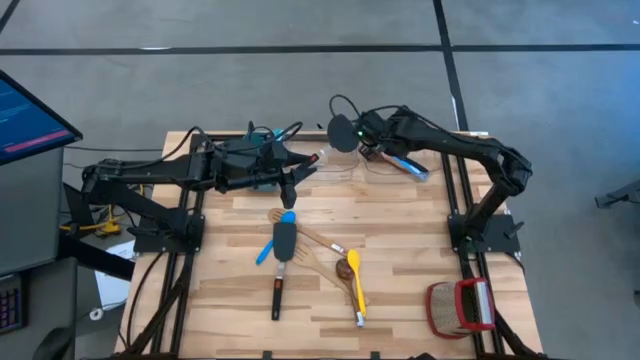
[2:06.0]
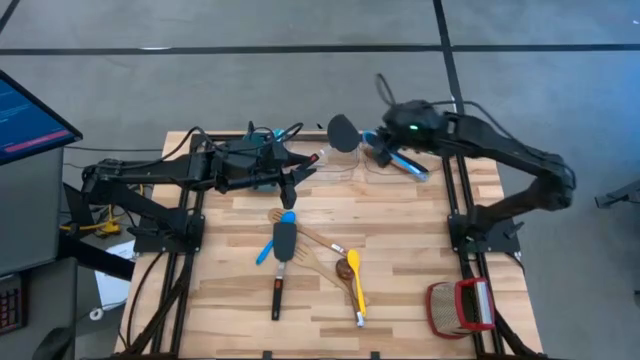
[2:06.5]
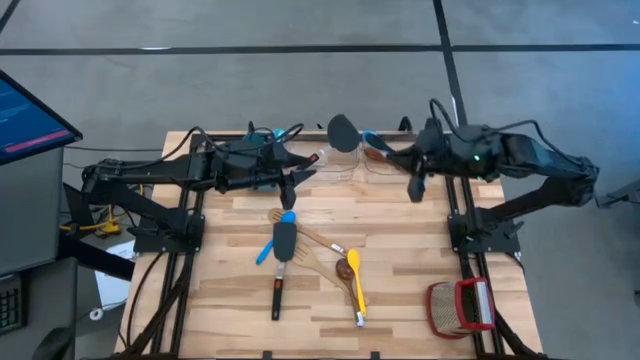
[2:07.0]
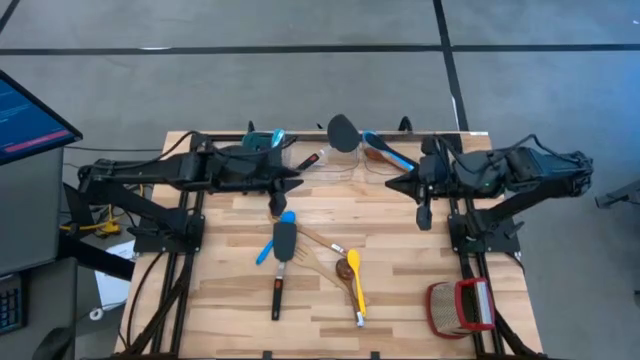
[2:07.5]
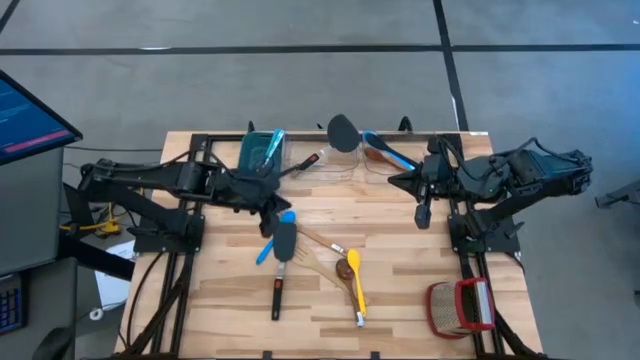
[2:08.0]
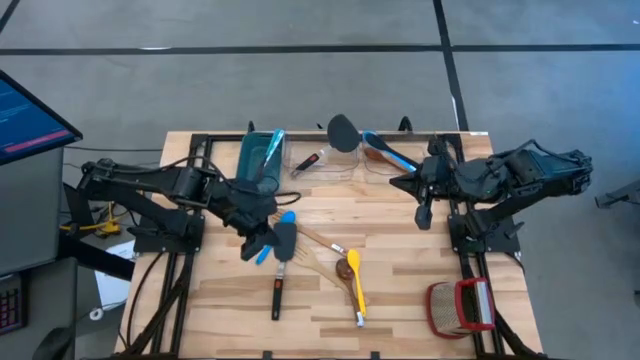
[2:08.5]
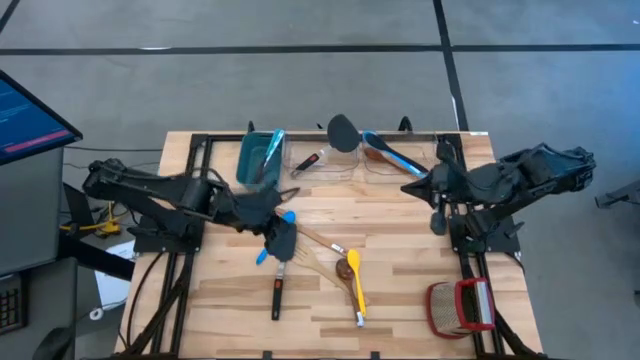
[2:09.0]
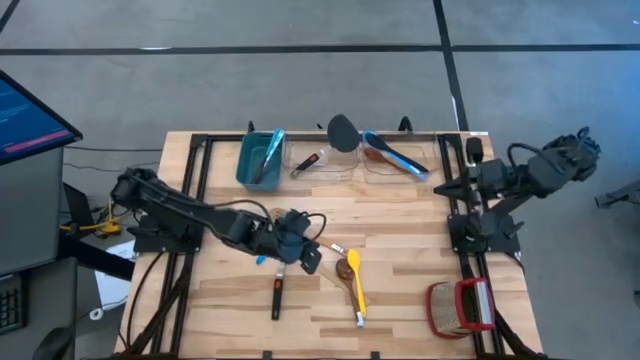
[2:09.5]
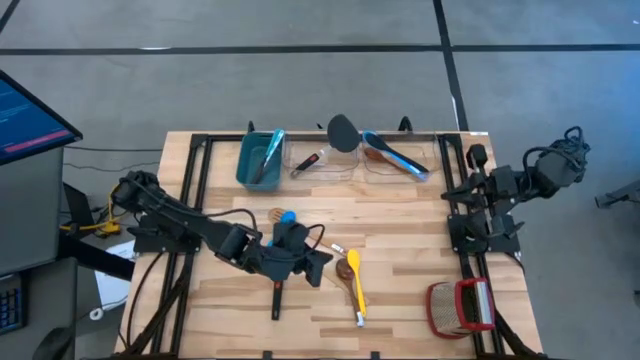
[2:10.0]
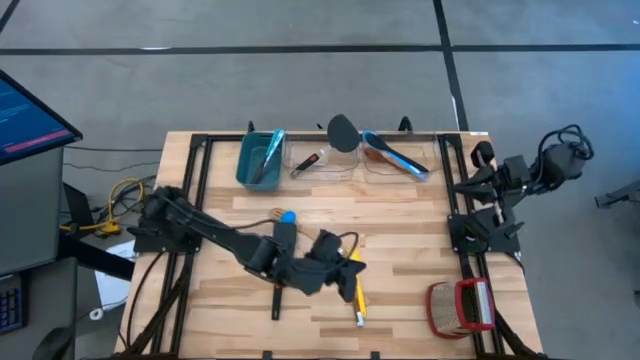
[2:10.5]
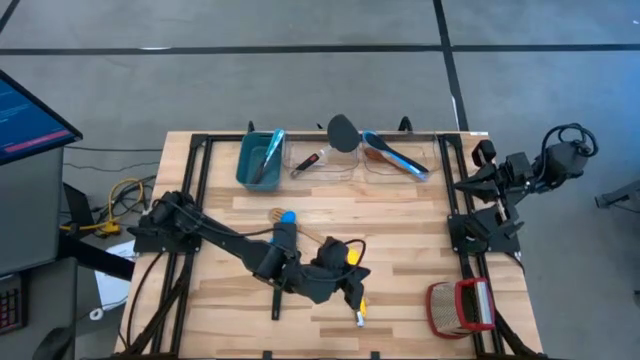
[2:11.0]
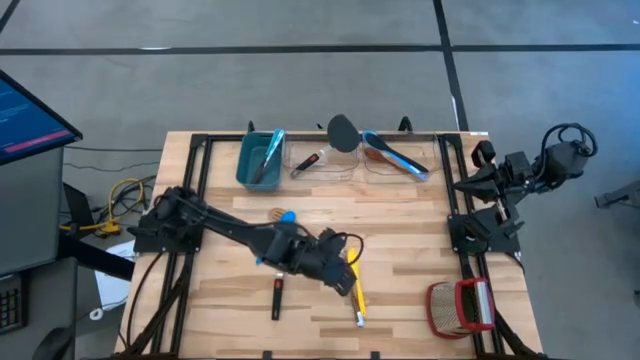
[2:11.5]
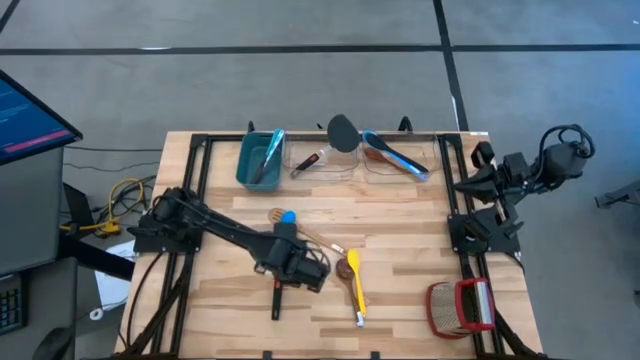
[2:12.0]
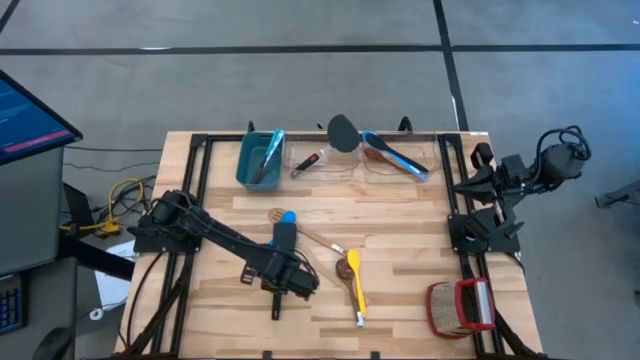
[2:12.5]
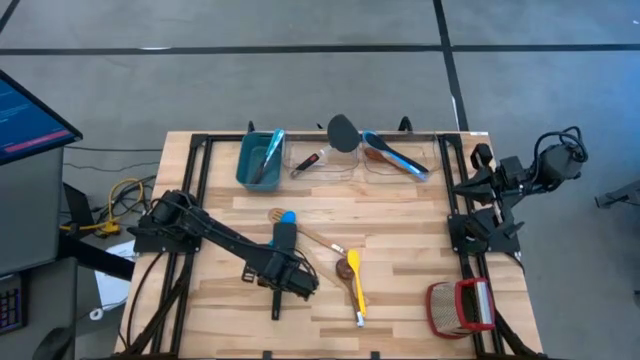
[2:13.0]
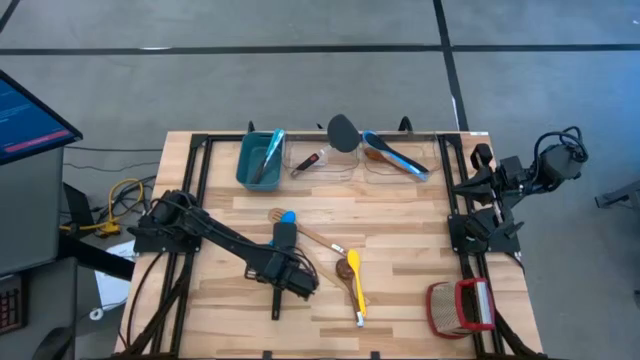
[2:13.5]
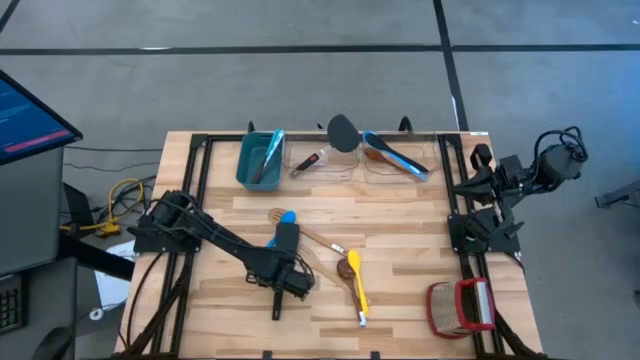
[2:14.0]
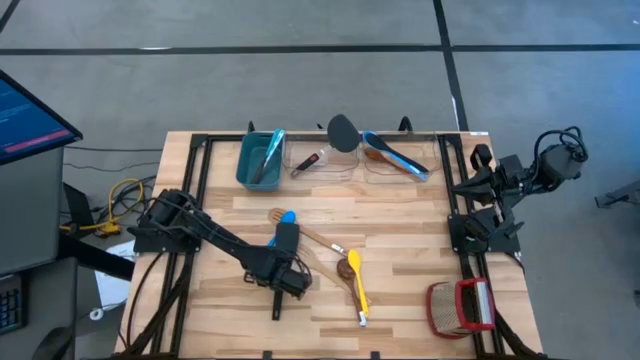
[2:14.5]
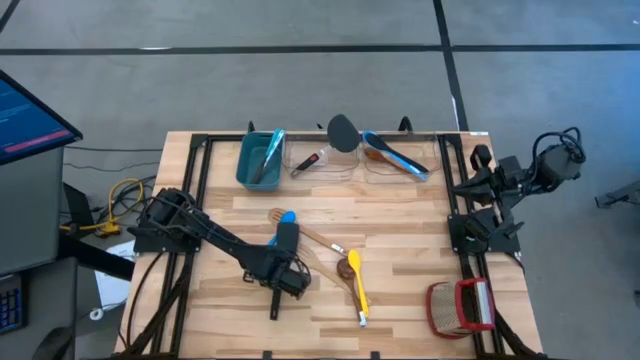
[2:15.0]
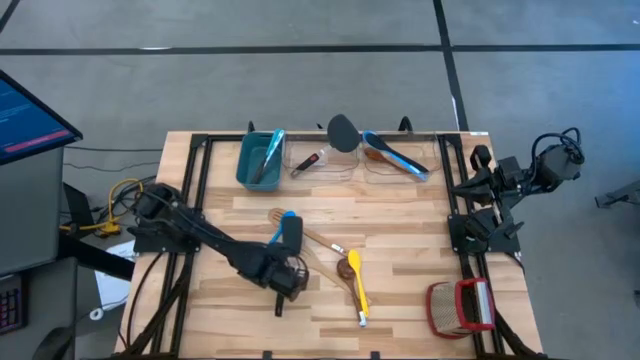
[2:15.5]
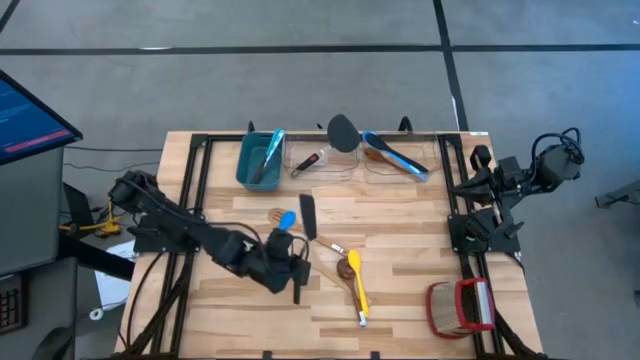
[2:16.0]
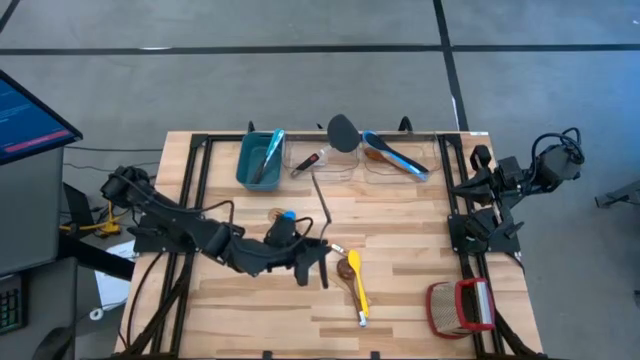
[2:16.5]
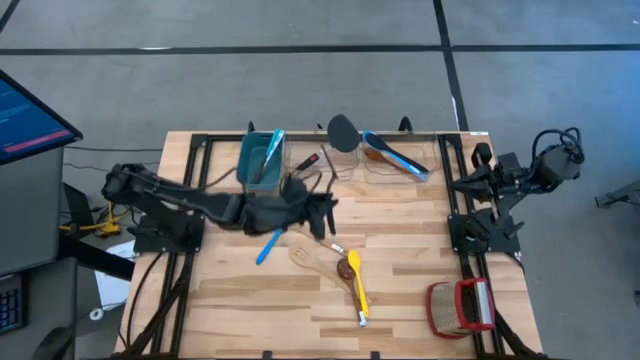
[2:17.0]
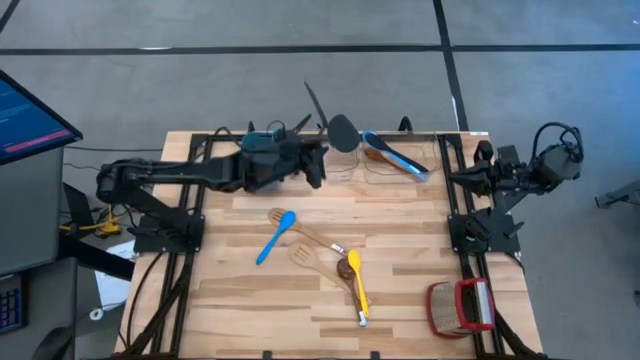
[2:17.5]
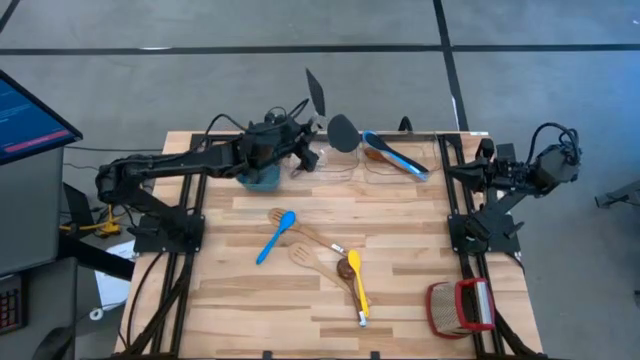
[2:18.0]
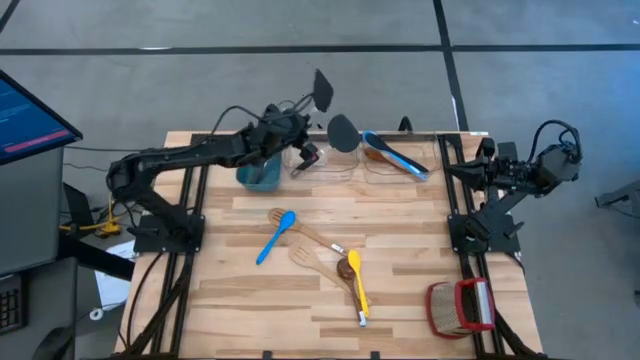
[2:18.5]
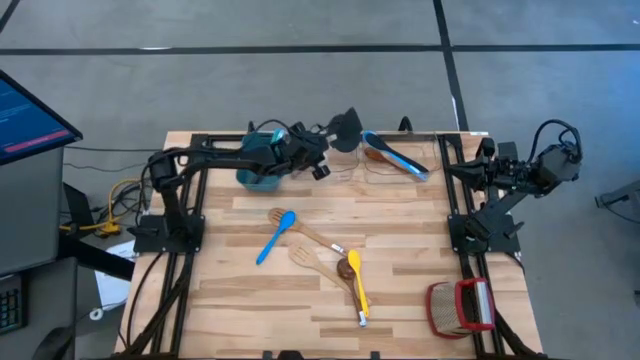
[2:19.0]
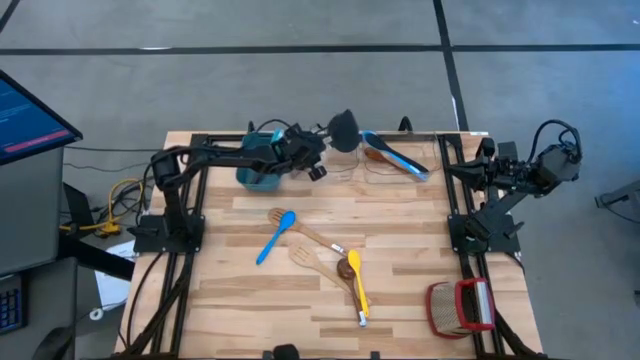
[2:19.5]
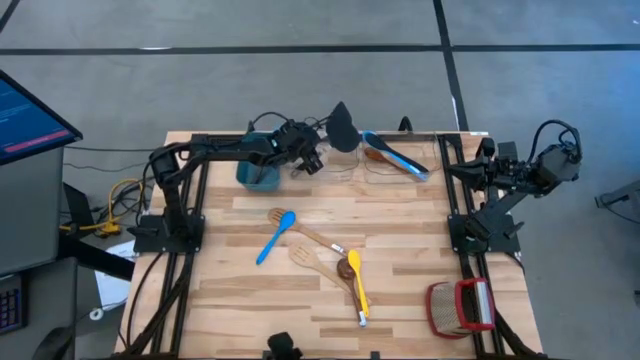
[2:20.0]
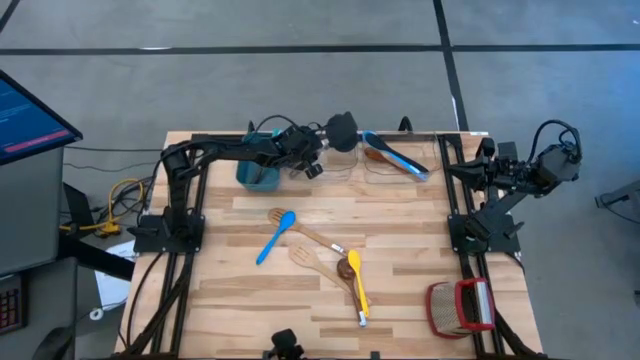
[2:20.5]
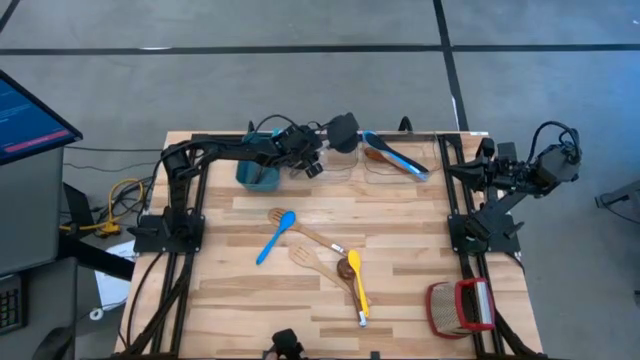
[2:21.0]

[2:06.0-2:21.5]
Task: Pick & Place Kitchen Items
Put the black spatula into the left transparent bin

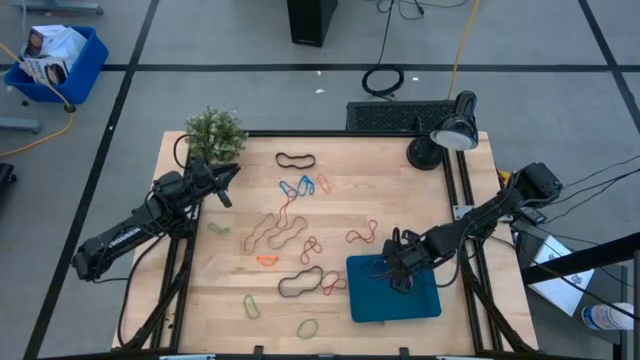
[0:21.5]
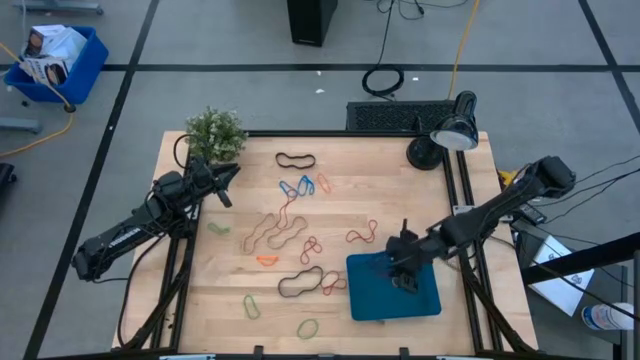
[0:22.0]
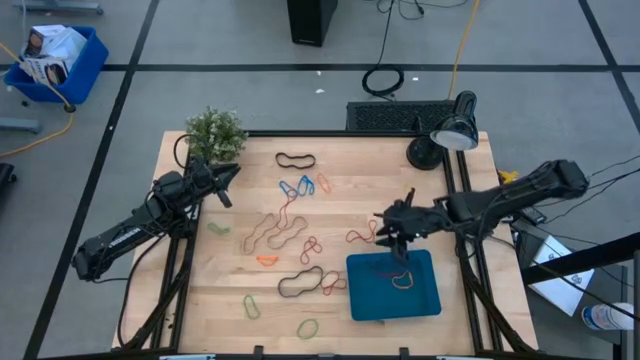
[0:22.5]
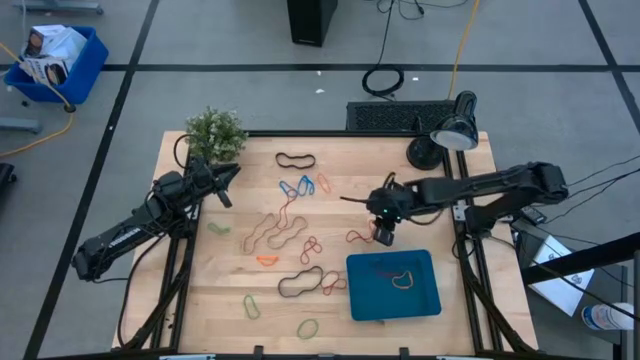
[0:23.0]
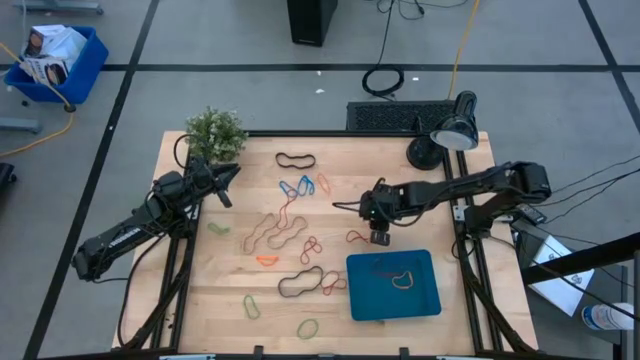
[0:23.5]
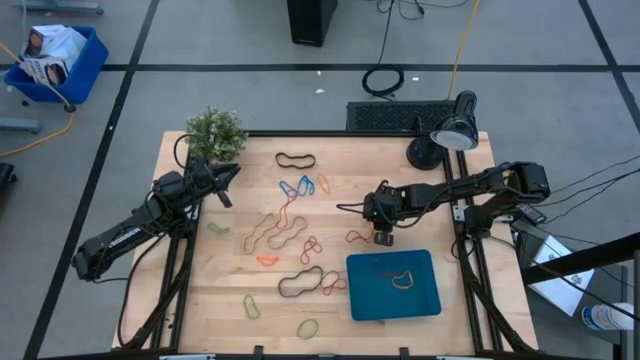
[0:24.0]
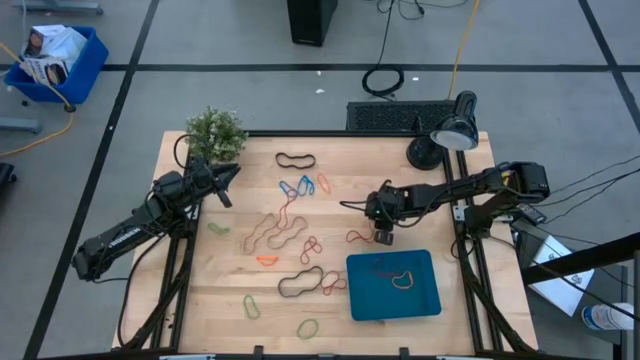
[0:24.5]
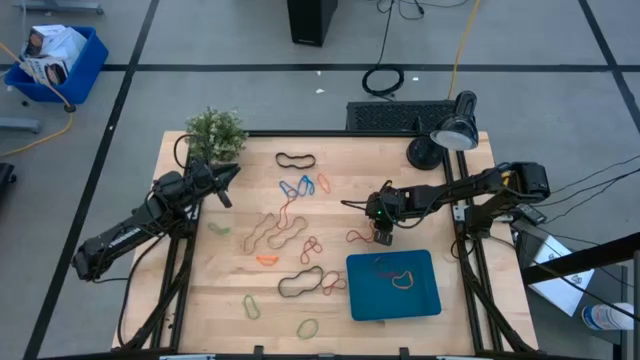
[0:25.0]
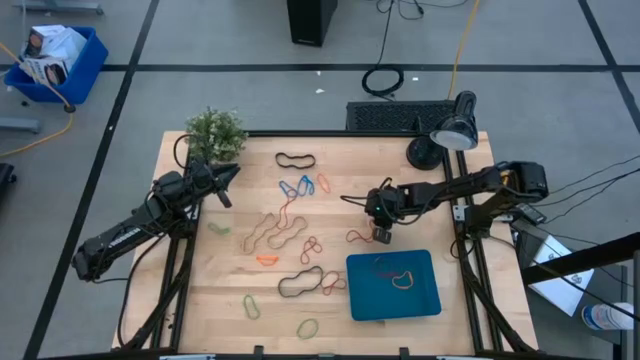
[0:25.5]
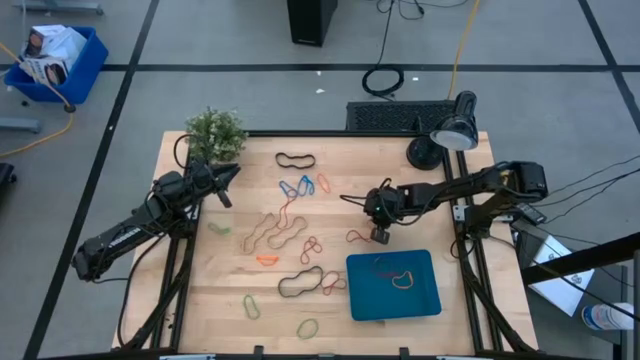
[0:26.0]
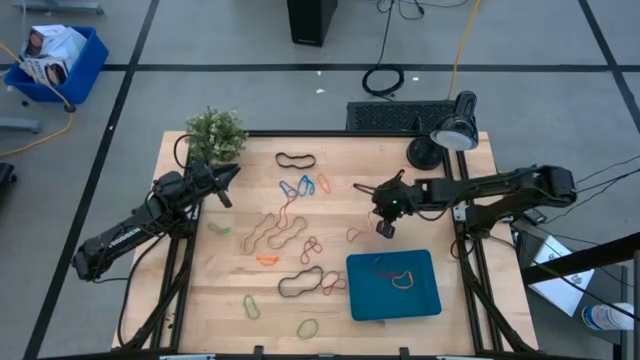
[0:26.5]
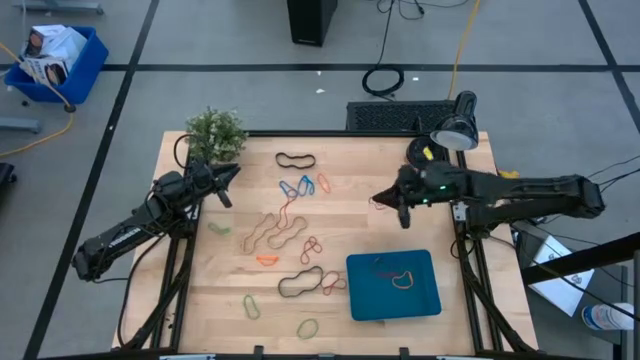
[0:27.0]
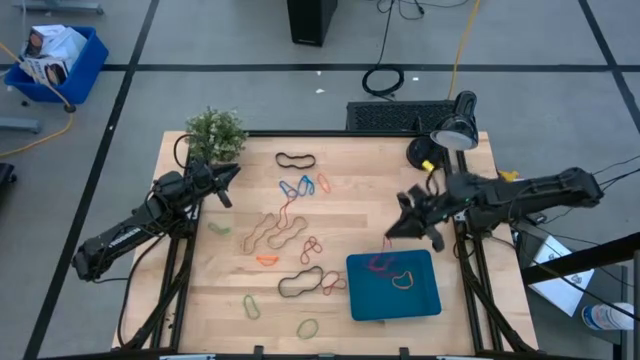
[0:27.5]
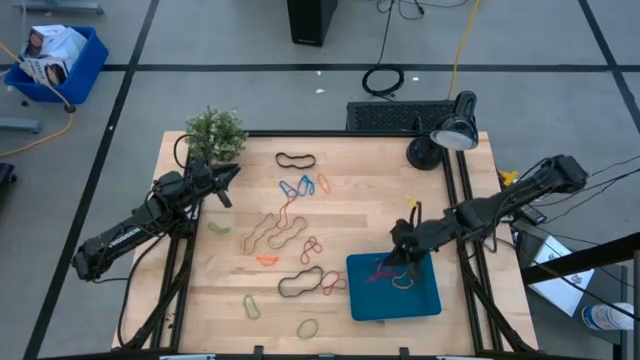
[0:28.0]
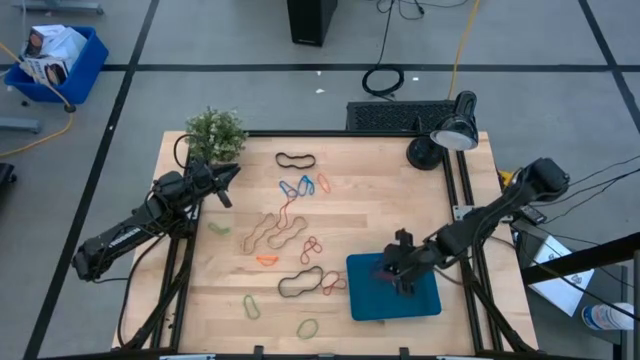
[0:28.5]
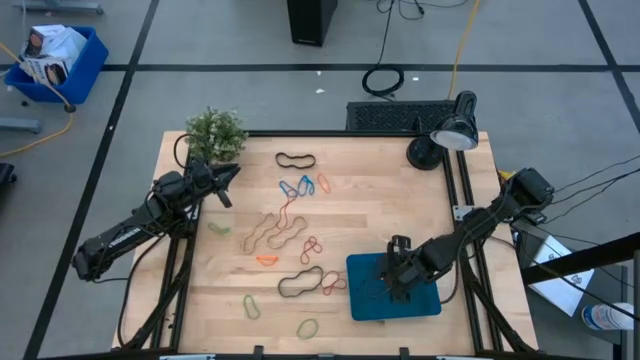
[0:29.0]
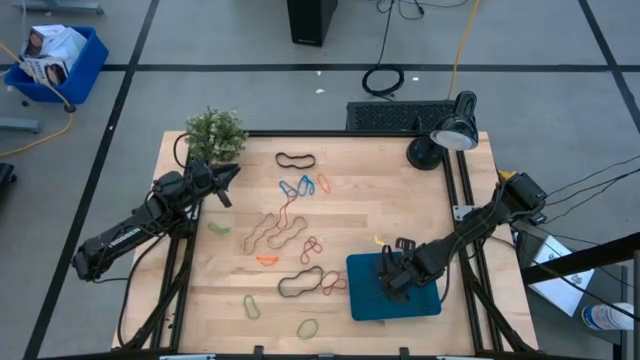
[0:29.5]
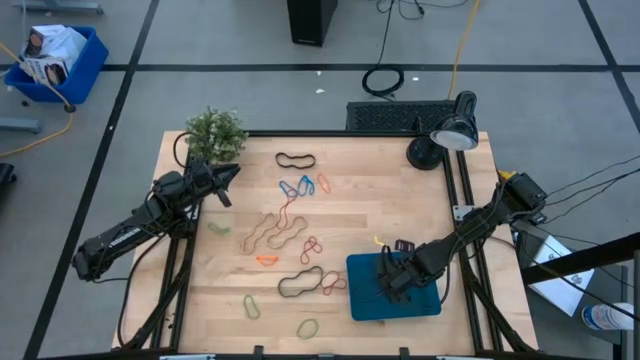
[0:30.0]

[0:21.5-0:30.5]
Task: Pick and place rubber bands into bin
Put the red rubber band into the blue bin
